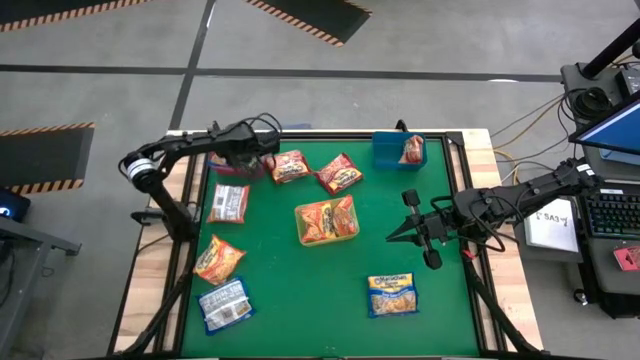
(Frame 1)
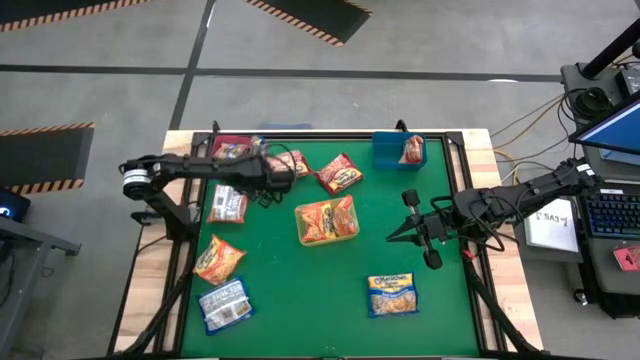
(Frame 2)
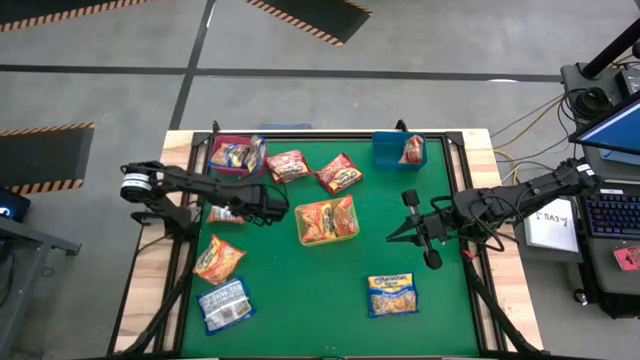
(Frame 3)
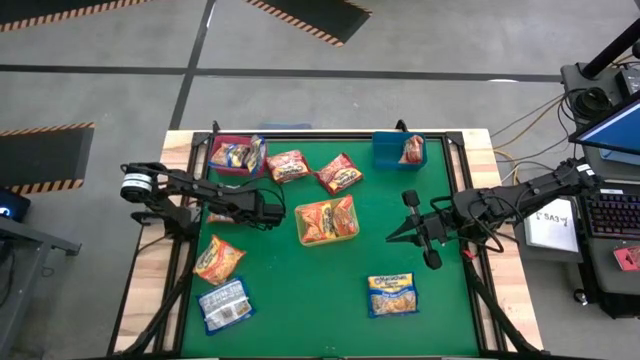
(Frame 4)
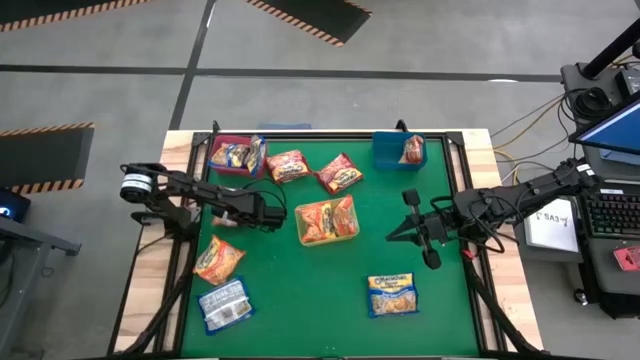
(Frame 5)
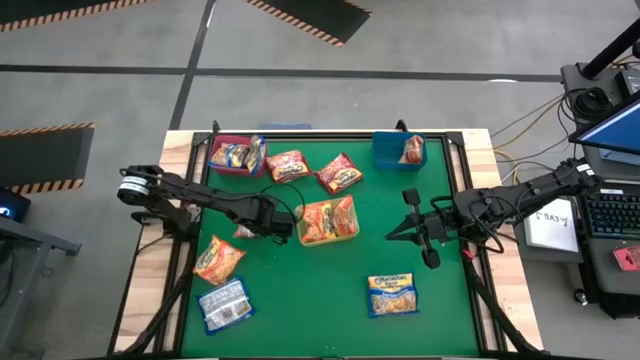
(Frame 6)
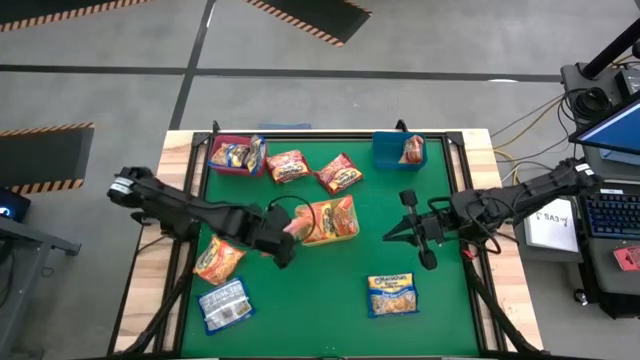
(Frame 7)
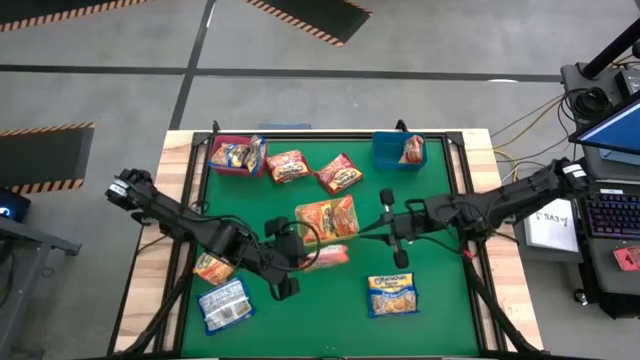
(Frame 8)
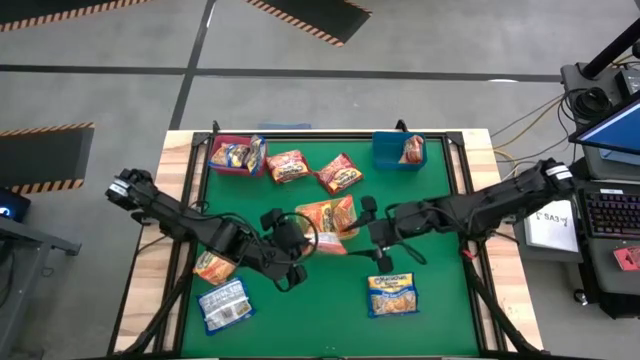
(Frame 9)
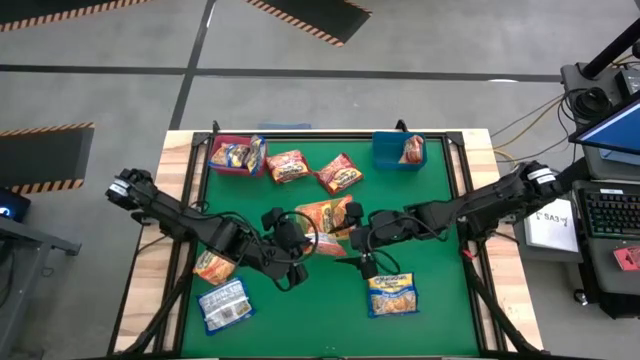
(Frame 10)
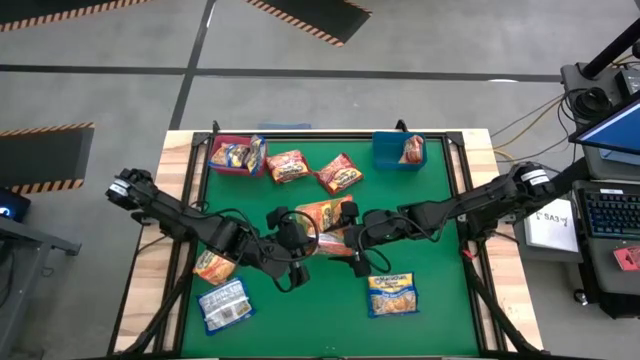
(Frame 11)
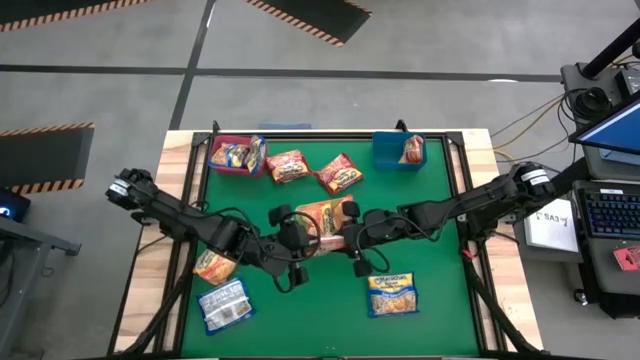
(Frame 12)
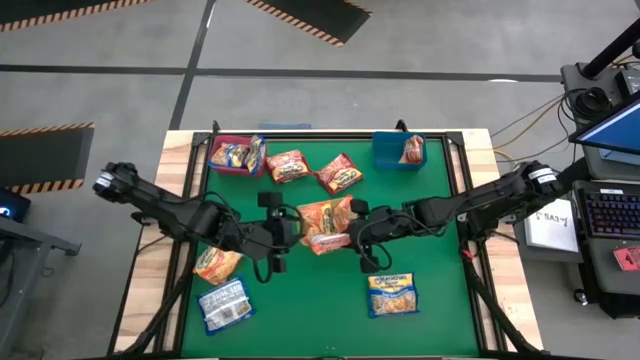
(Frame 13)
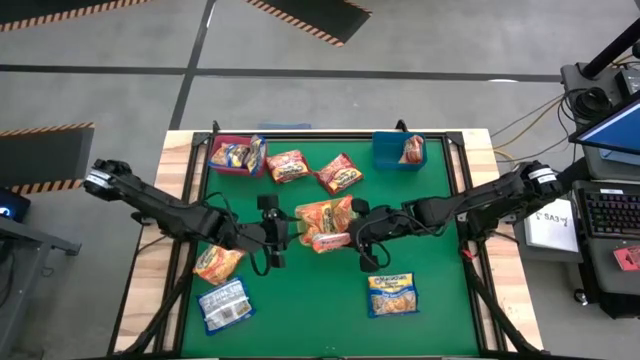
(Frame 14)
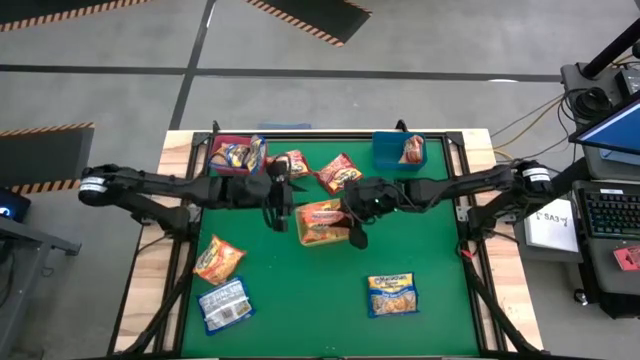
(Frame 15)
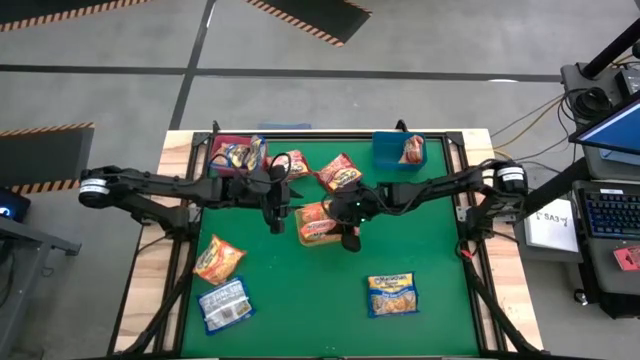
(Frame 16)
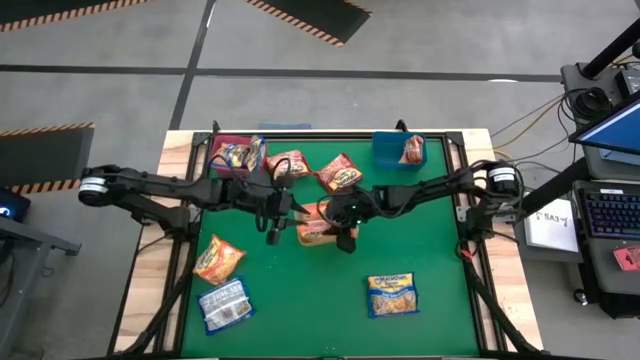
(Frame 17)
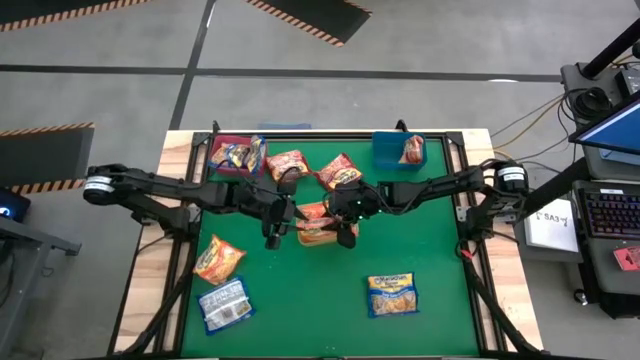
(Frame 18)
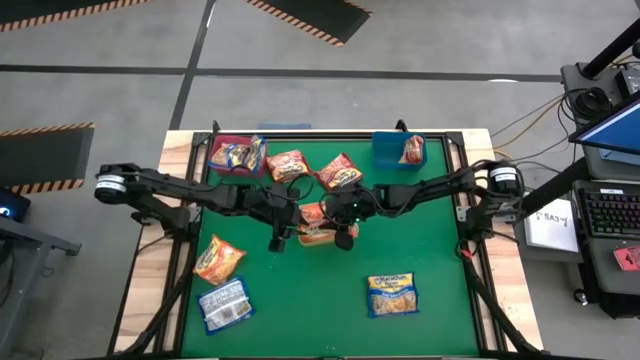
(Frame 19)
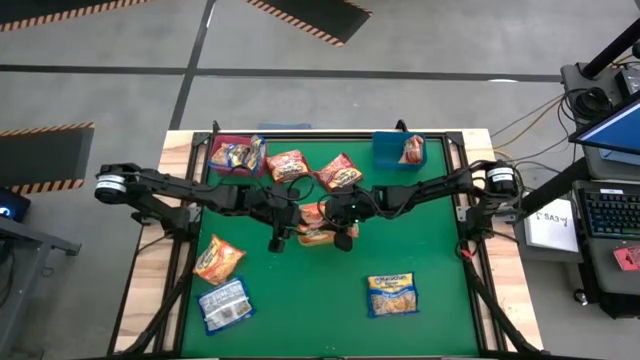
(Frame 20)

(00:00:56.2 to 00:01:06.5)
Task: Sort Maruchan noodles
Put the orange noodle pack into the yellow bin

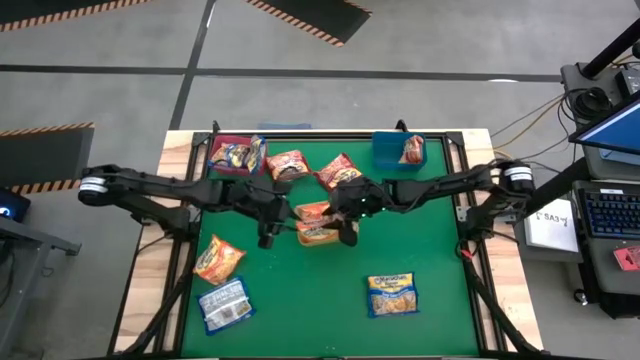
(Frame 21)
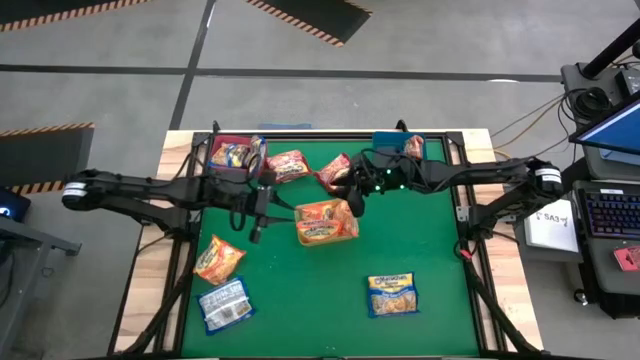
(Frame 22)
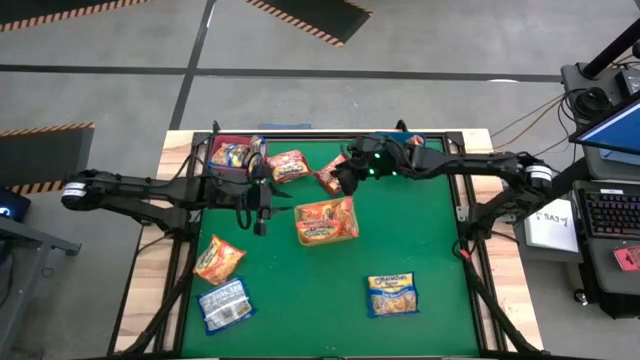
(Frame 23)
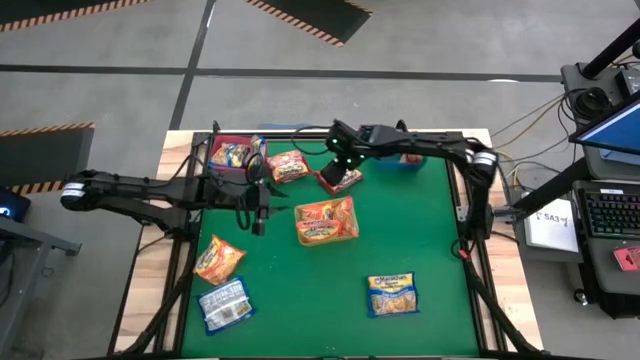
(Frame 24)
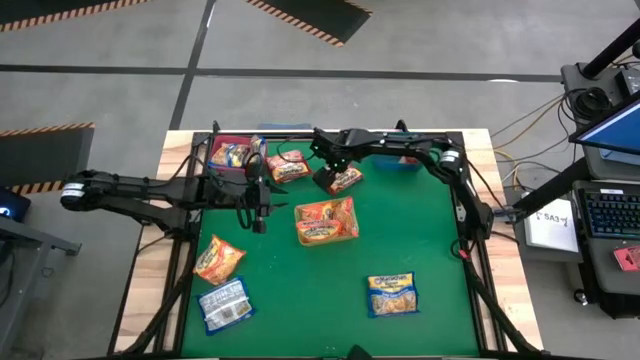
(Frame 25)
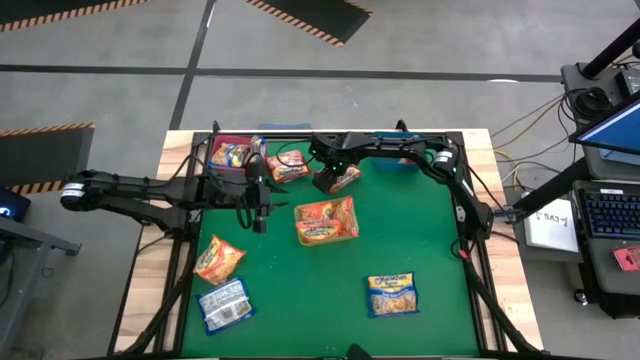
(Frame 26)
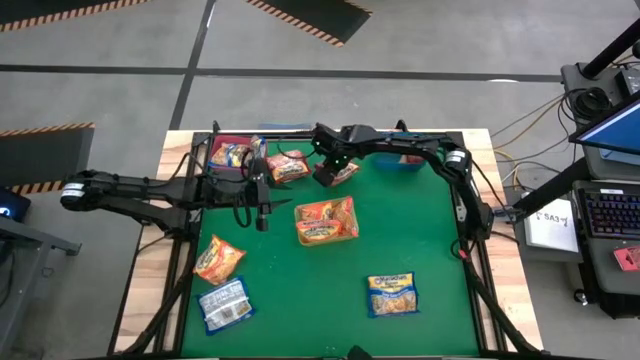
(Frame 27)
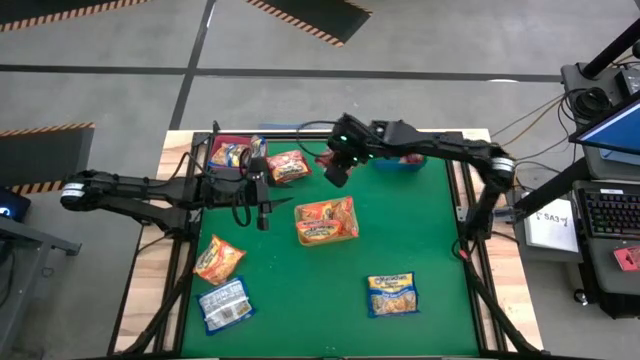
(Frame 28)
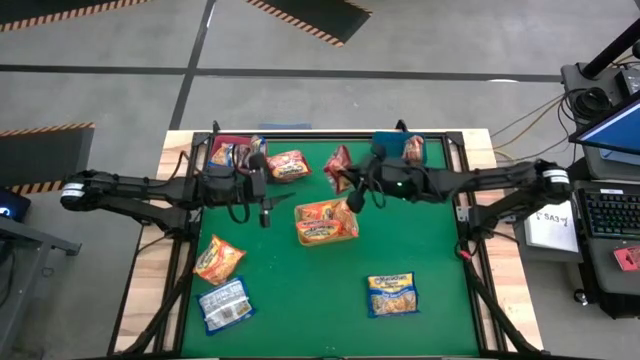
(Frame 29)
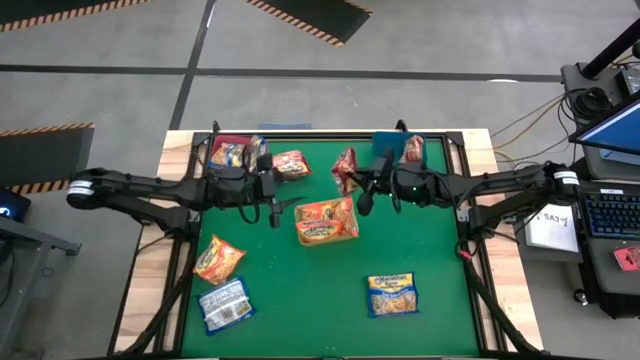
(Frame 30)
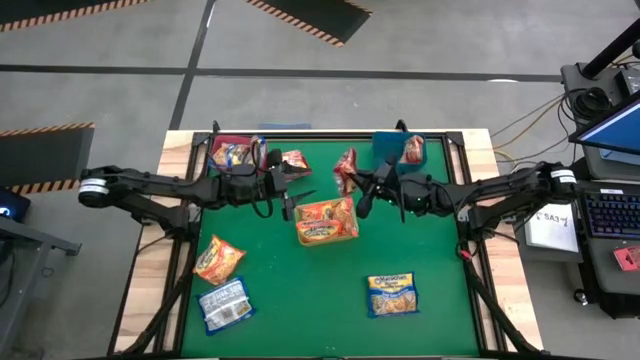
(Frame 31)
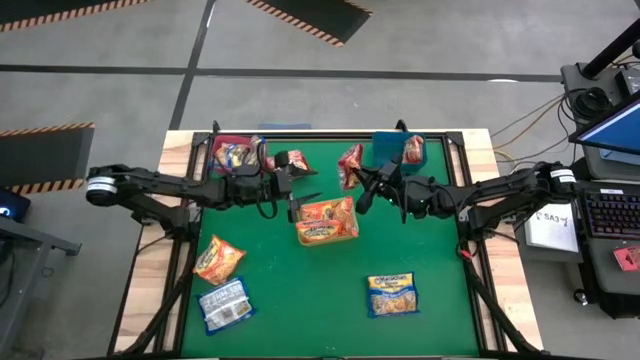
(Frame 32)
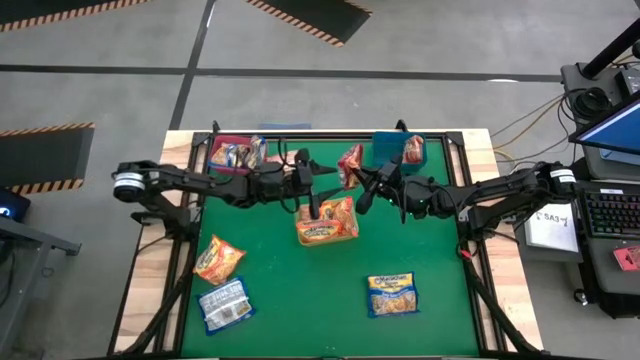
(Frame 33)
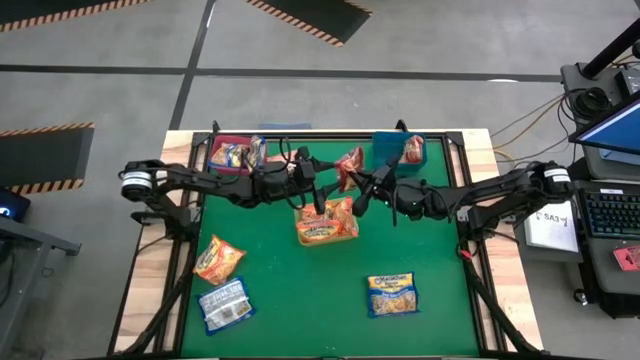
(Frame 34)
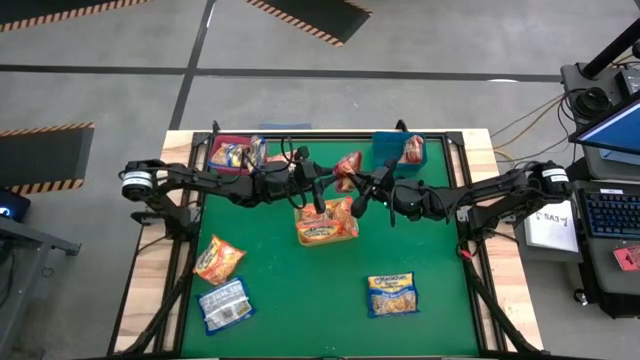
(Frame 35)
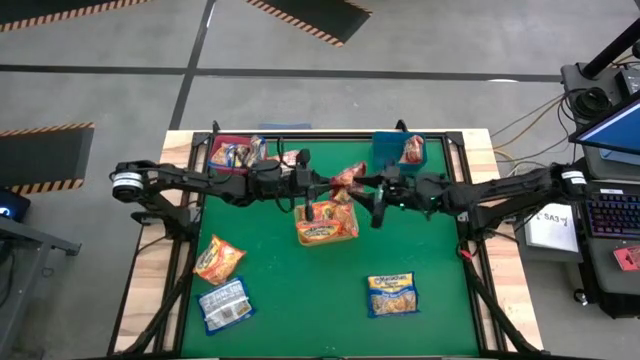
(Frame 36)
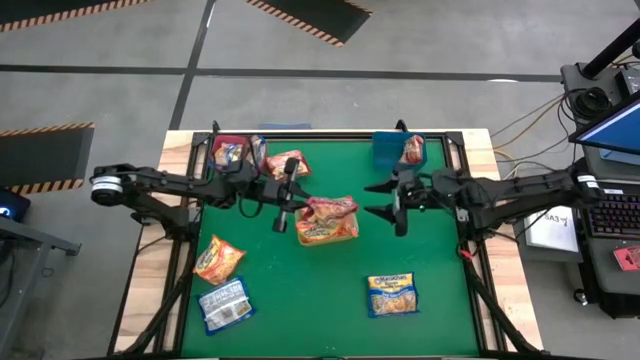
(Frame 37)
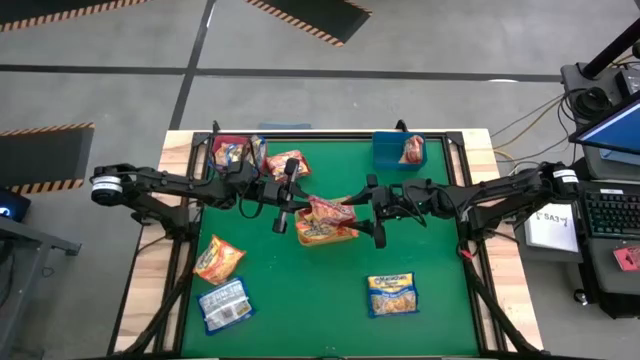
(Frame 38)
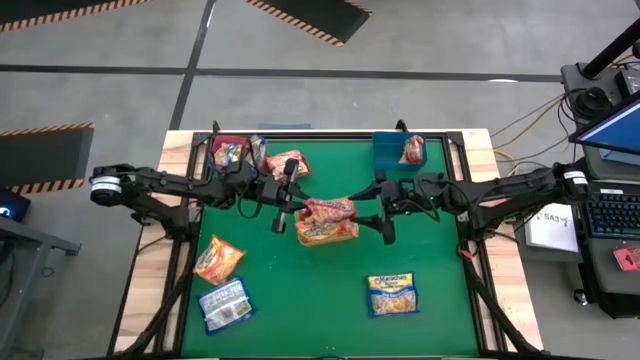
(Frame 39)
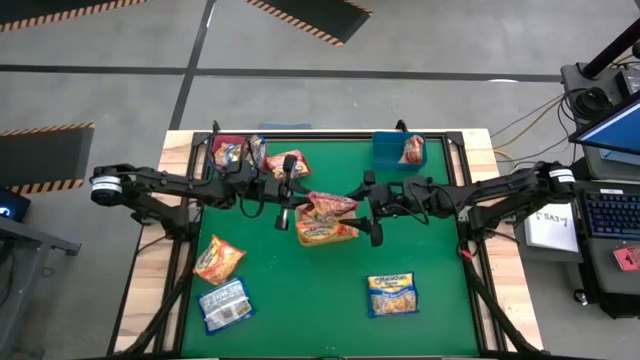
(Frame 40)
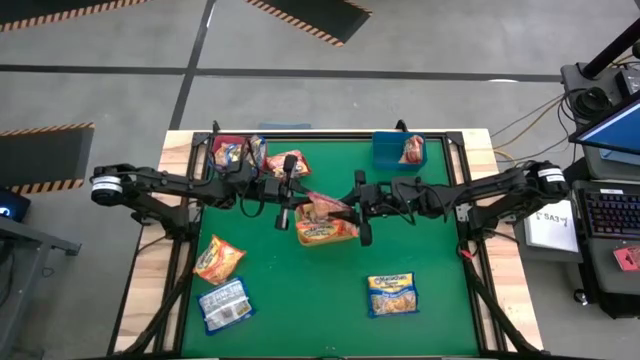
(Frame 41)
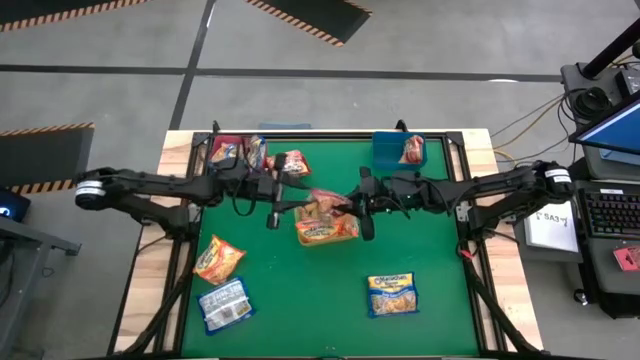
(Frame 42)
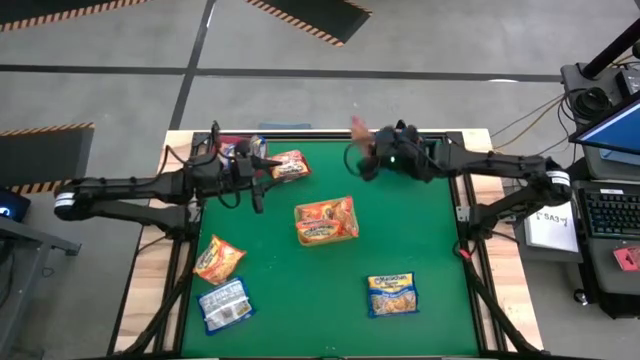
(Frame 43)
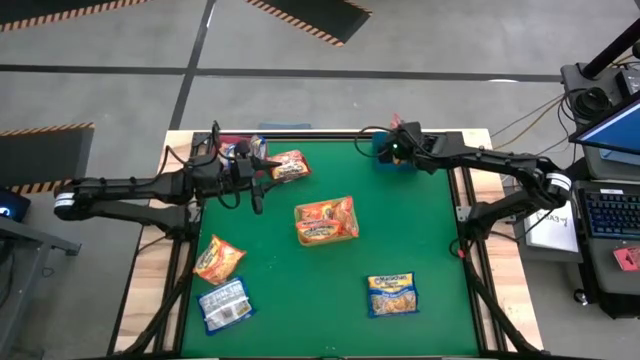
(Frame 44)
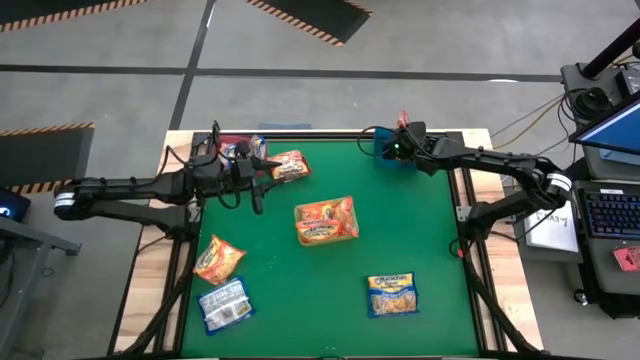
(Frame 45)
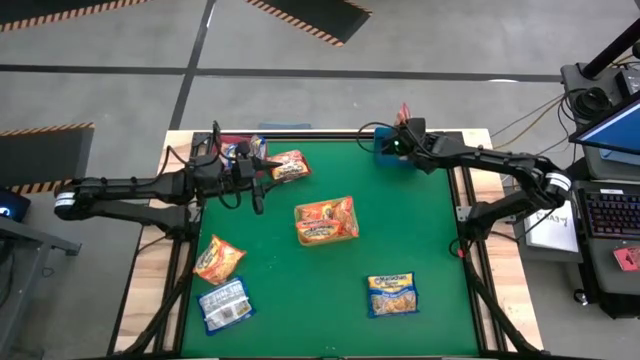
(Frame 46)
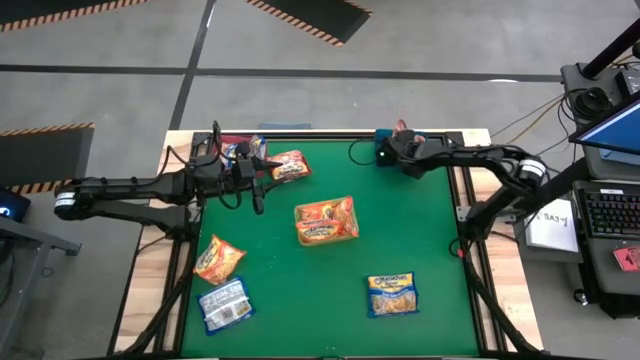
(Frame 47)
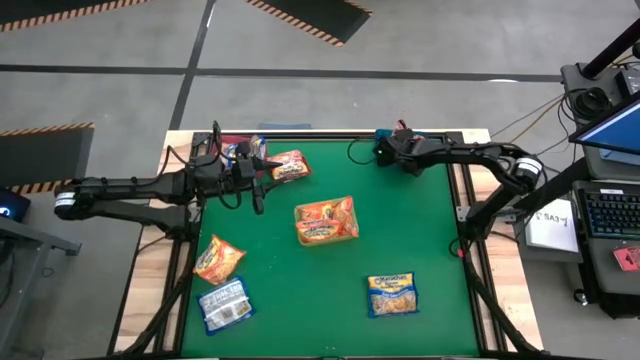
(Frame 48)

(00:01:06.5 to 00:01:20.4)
Put the red noodle pack into the blue bin
